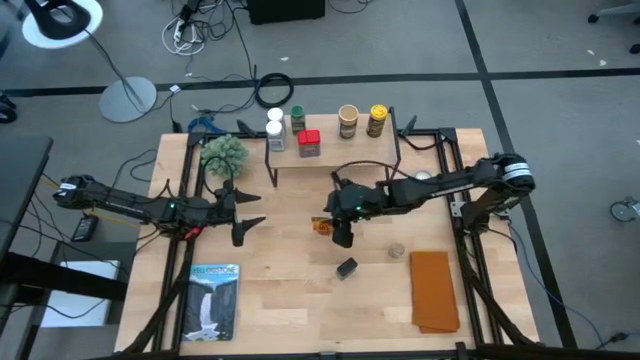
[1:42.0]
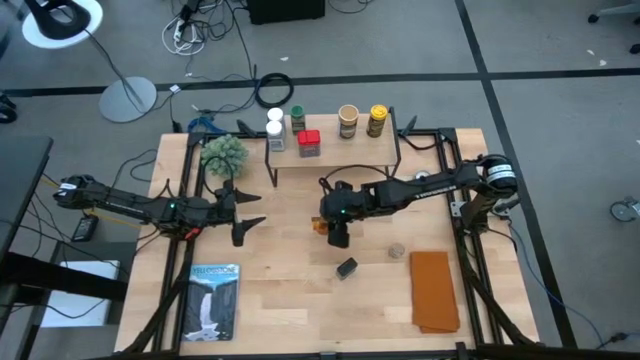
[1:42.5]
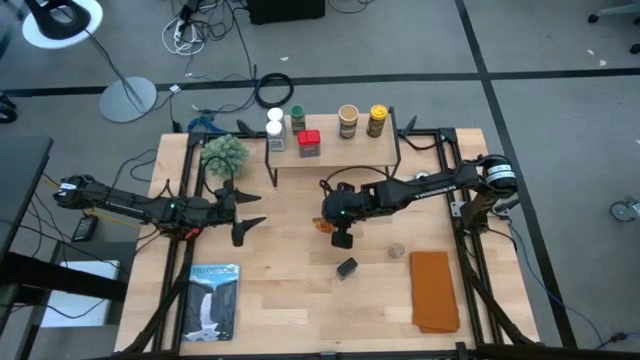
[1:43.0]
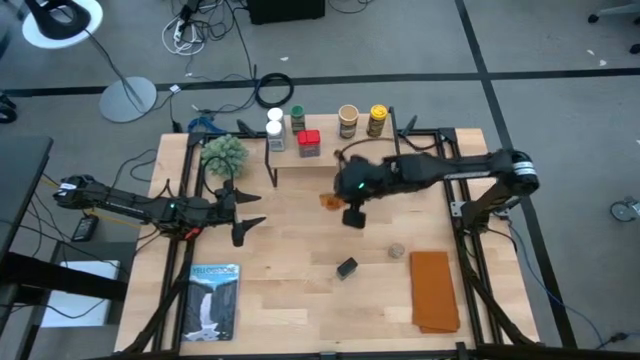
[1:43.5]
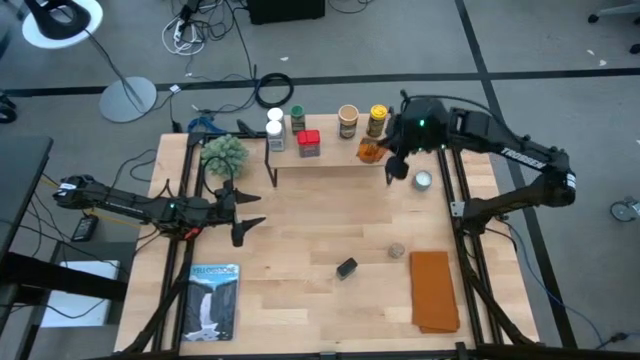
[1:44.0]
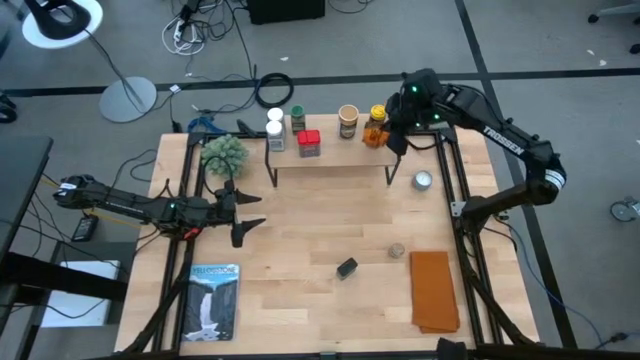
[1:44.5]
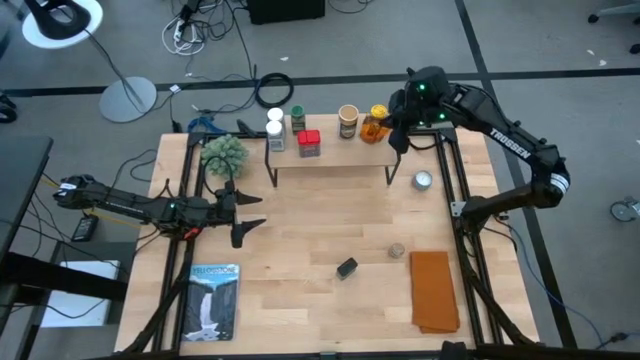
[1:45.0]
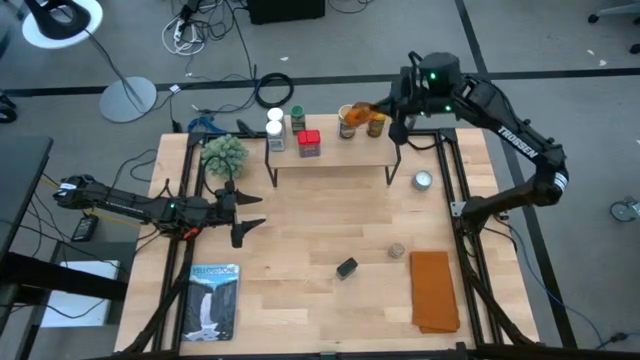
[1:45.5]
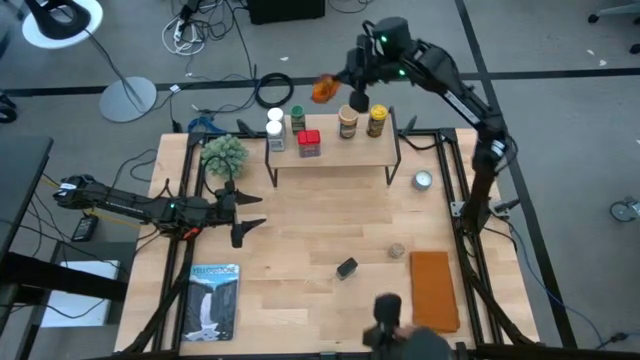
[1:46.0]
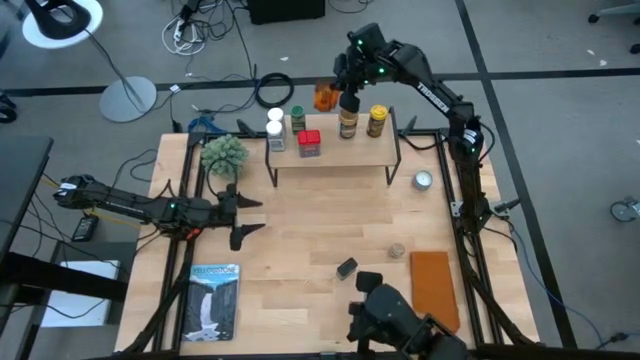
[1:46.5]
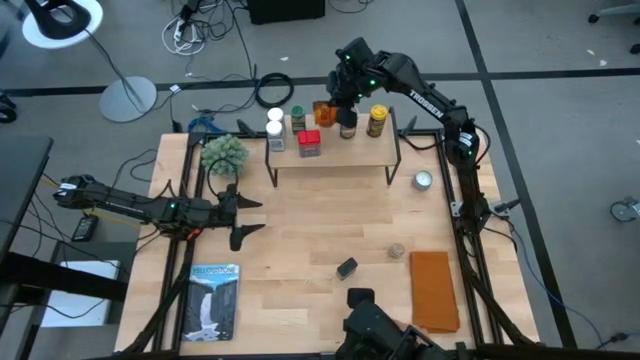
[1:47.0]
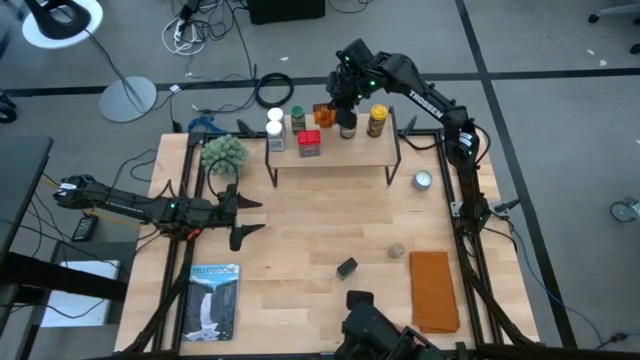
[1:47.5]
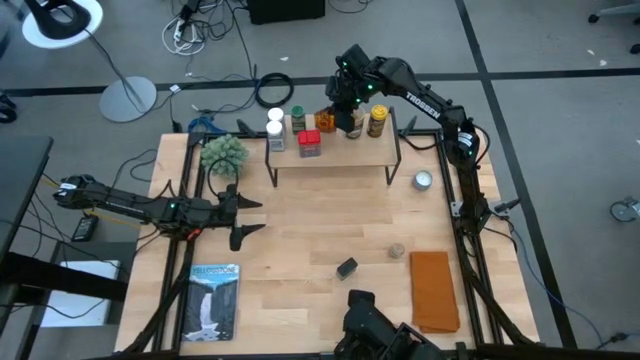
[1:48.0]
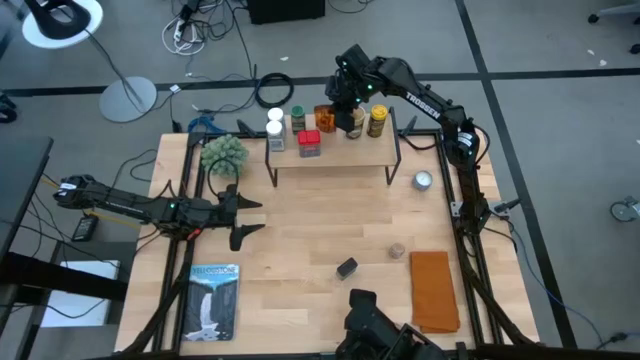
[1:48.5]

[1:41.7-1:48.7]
Task: Shelf spices
Put the orange seasoning pack on the shelf

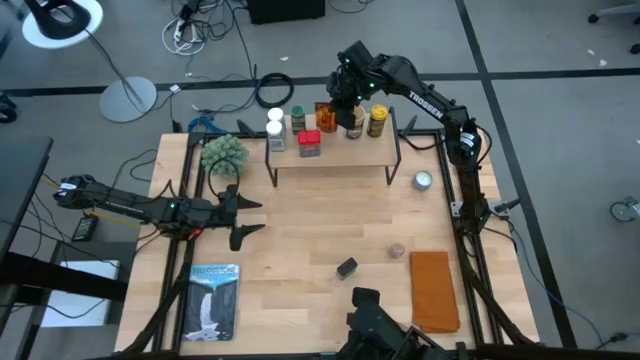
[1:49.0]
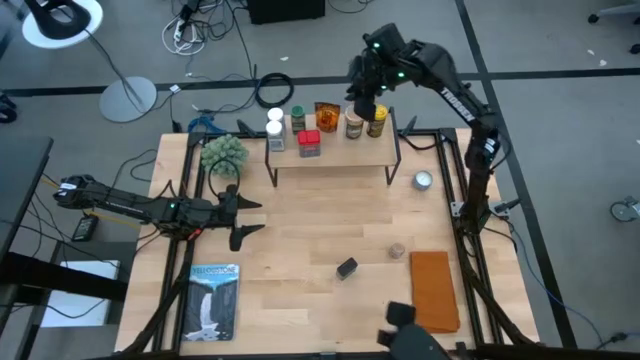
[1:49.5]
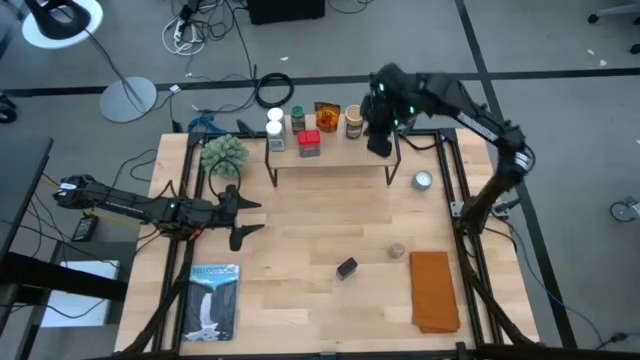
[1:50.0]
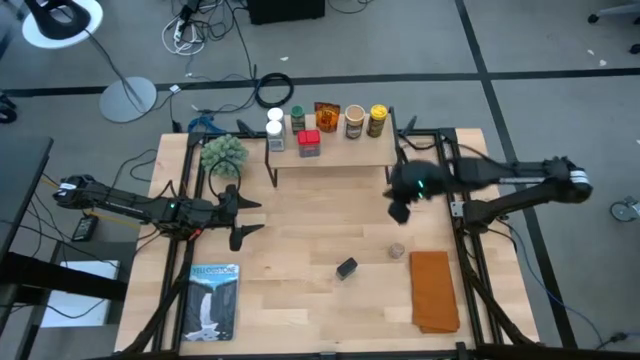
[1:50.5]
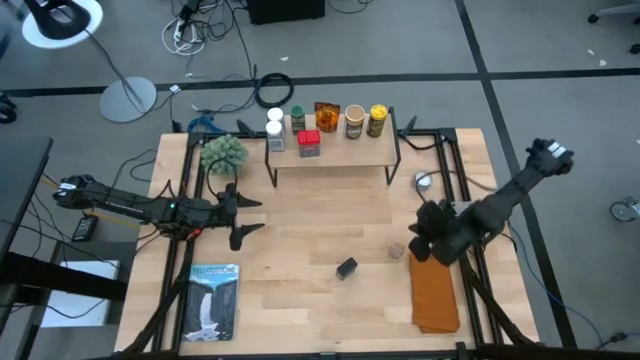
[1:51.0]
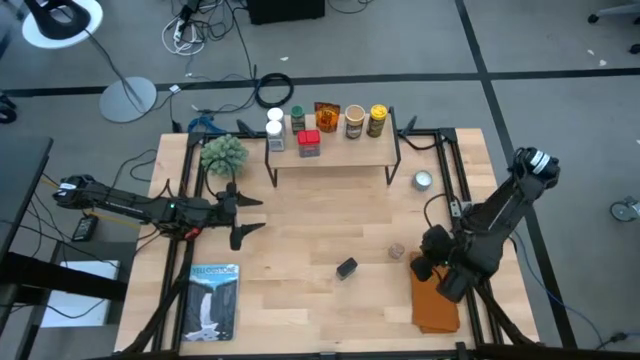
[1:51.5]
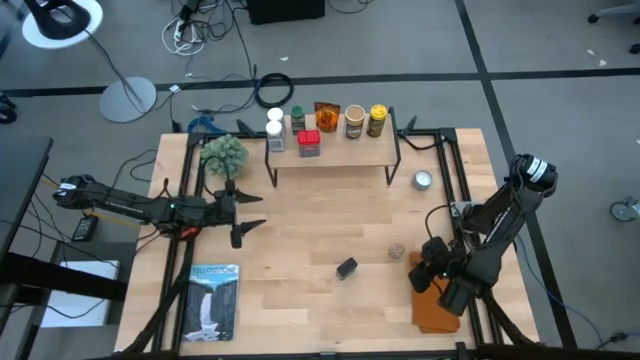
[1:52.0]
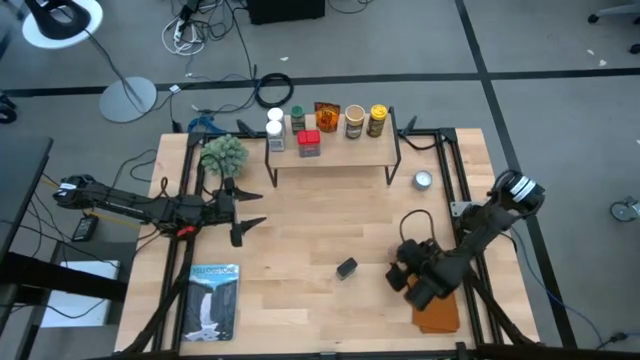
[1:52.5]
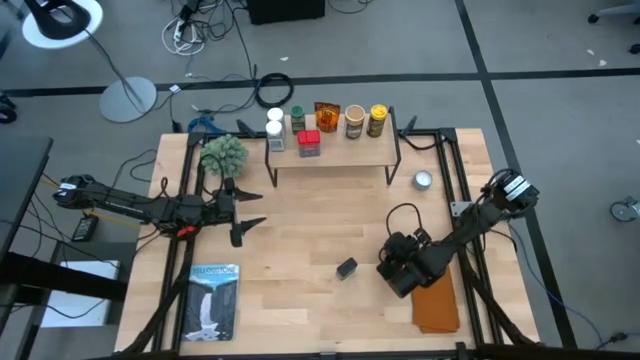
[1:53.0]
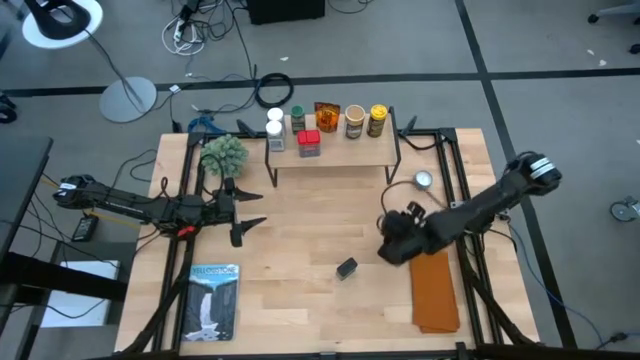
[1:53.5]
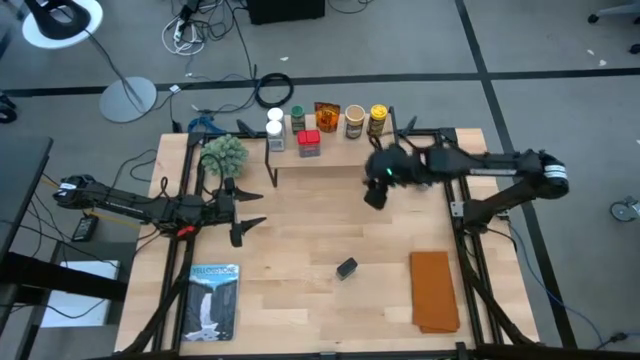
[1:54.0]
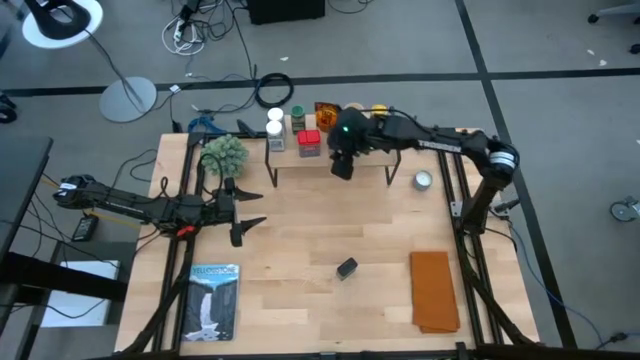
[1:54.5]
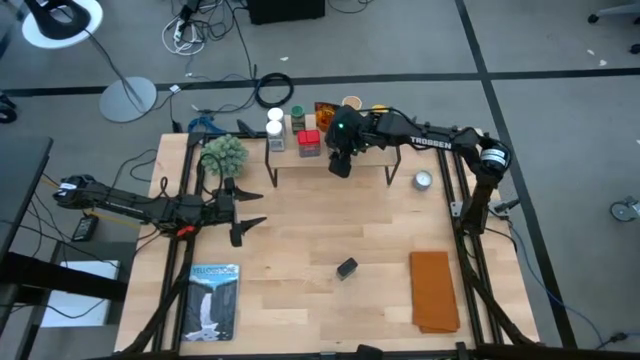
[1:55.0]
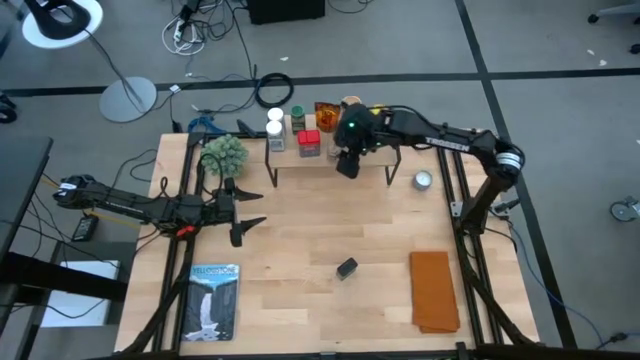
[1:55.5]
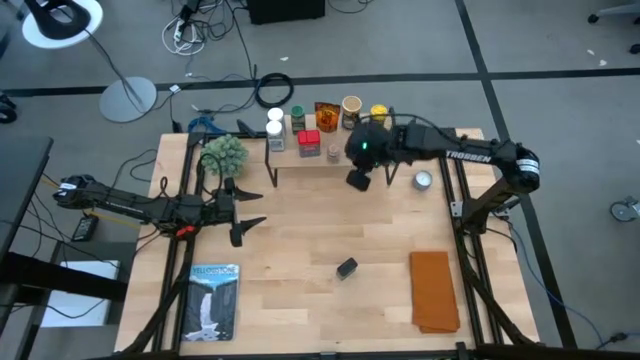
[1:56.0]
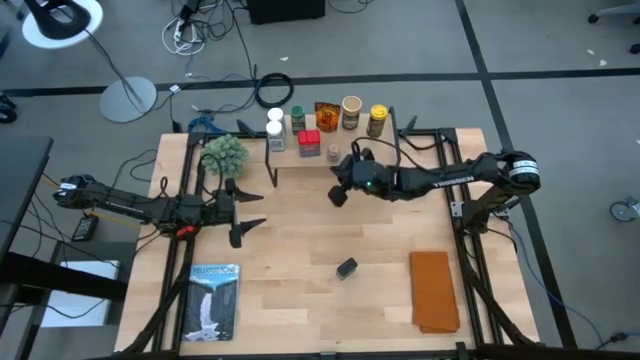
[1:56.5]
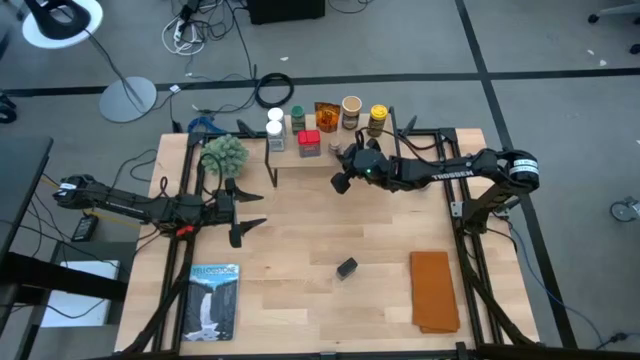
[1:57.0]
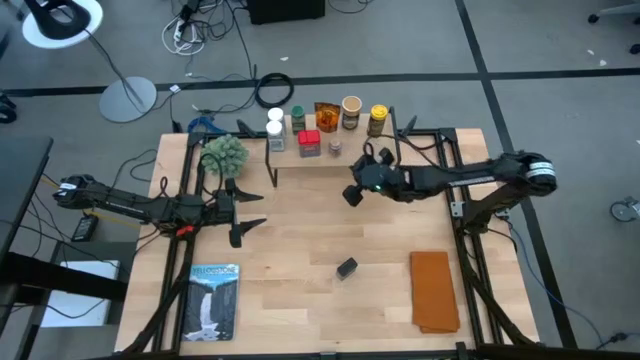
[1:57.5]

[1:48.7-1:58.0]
Put the brown seasoning bottle on the shelf

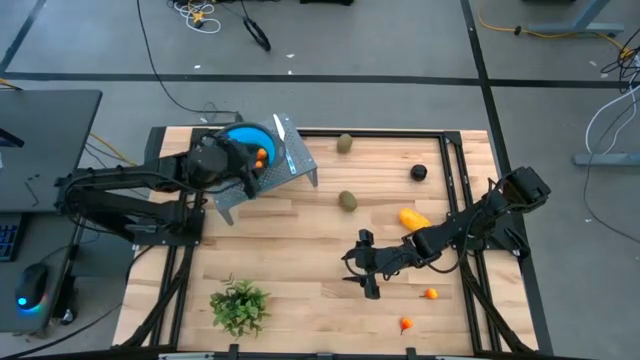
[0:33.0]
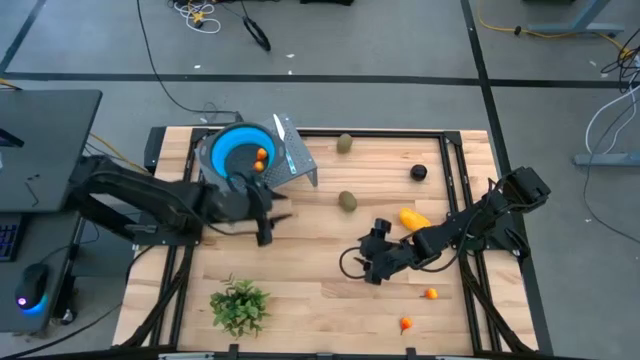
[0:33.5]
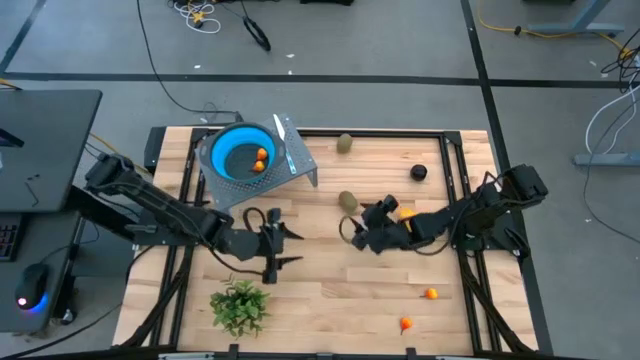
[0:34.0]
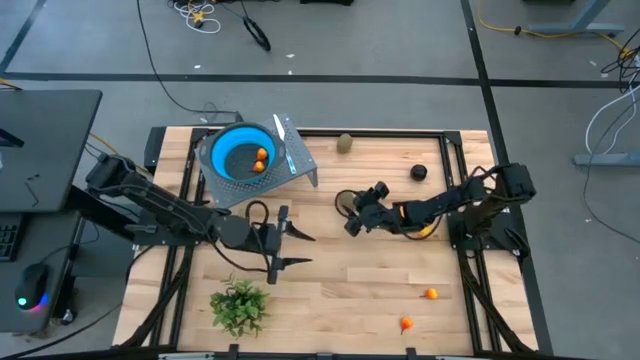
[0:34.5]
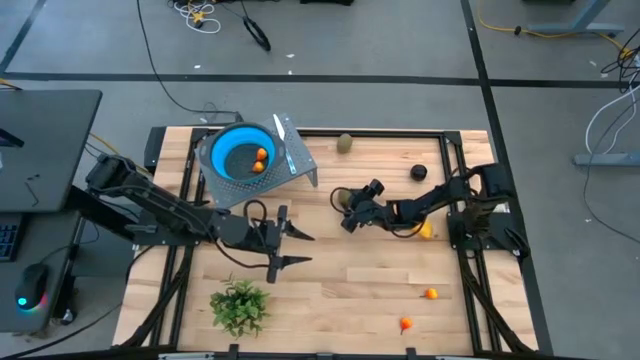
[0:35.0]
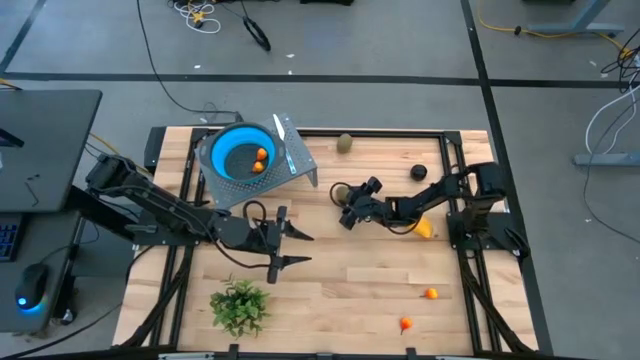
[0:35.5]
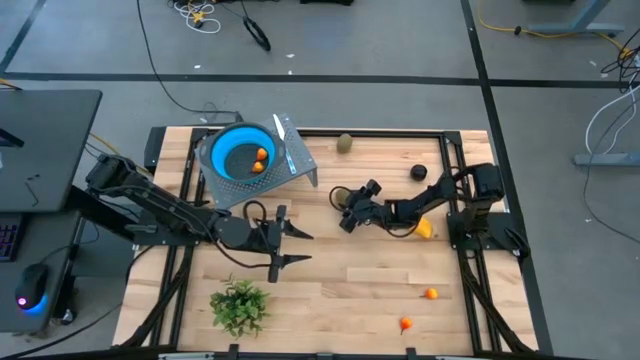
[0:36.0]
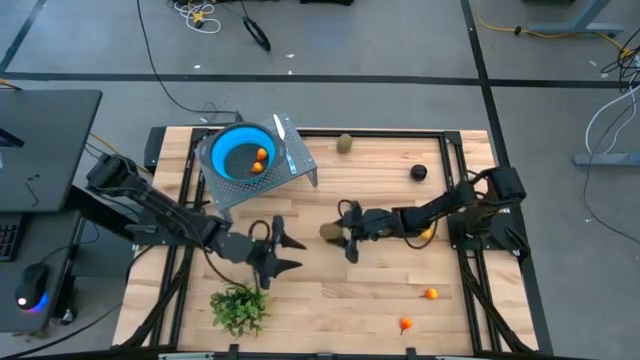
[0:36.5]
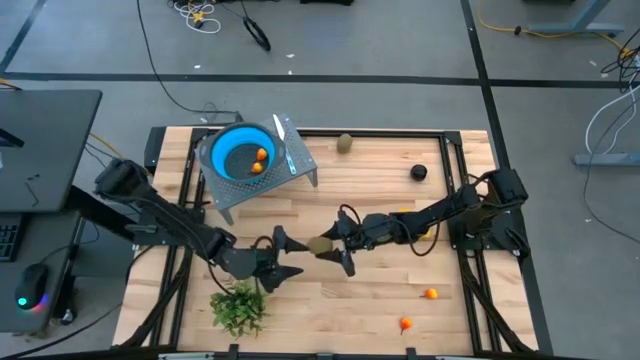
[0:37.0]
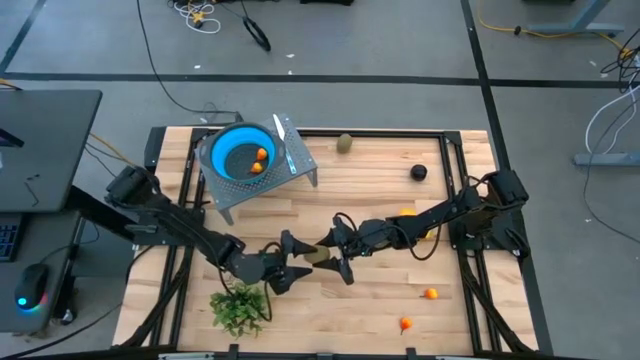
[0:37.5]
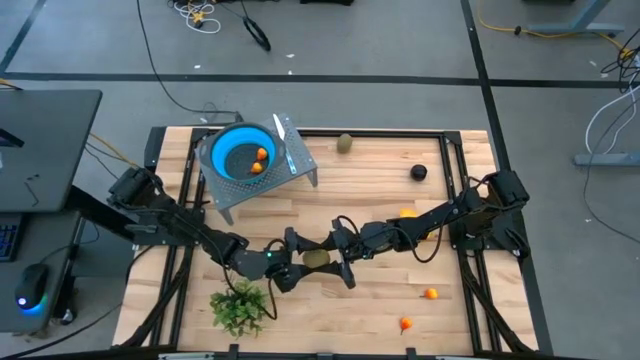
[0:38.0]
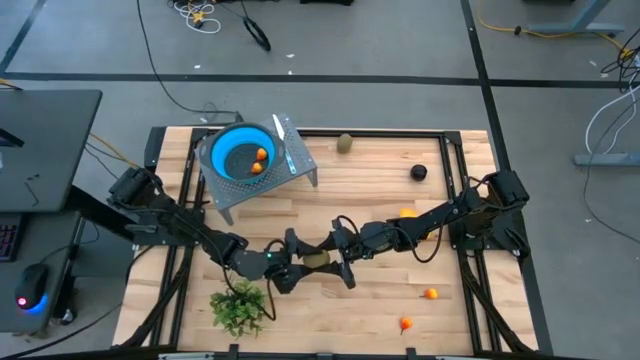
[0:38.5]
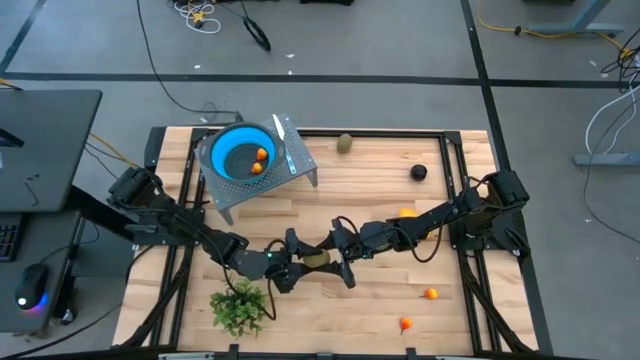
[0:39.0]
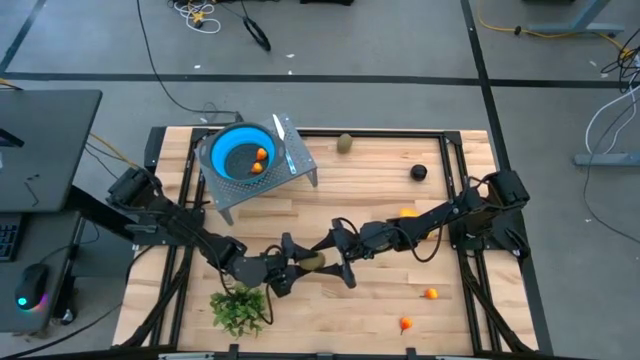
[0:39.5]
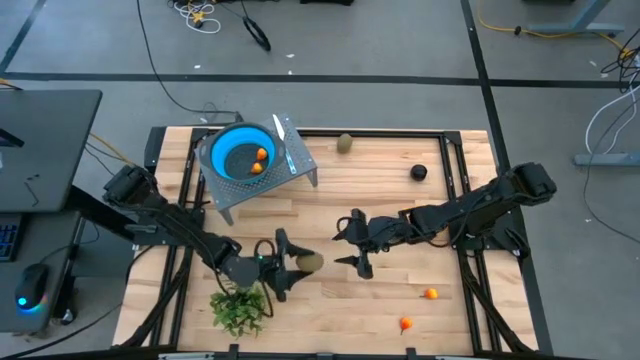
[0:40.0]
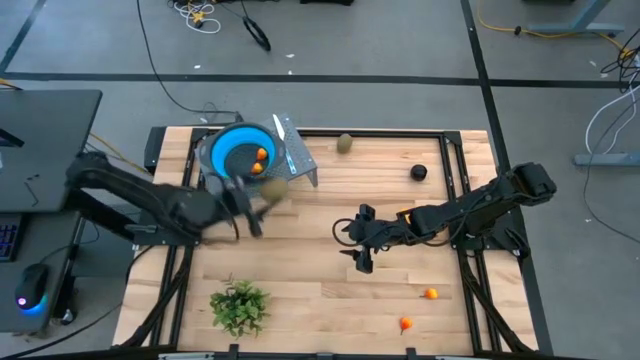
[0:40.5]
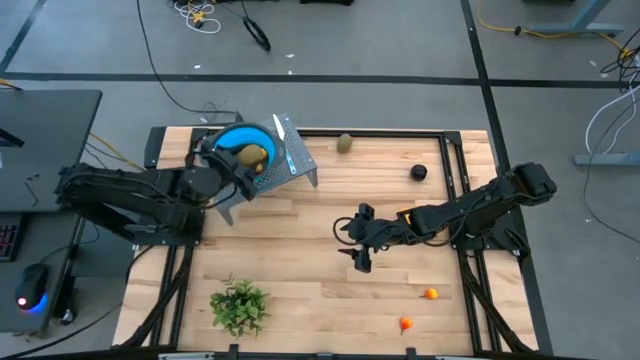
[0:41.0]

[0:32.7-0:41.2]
Task: Pick & Place Fruit
Put the bottom brown kiwi into the blue strainer bowl on the shelf
